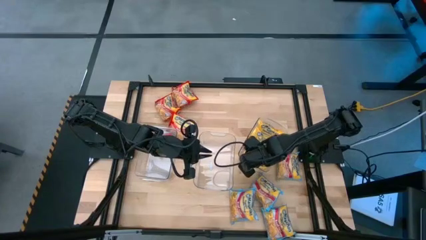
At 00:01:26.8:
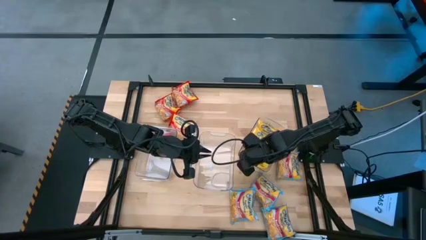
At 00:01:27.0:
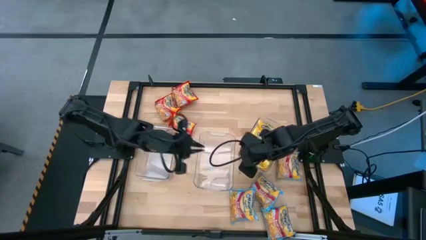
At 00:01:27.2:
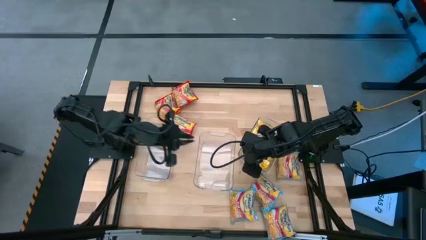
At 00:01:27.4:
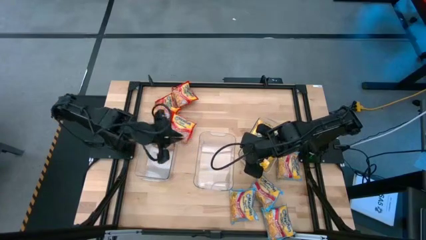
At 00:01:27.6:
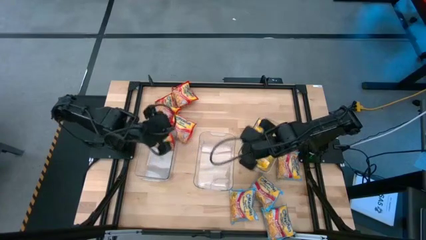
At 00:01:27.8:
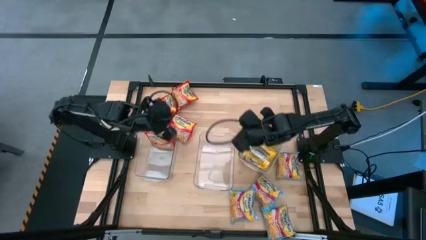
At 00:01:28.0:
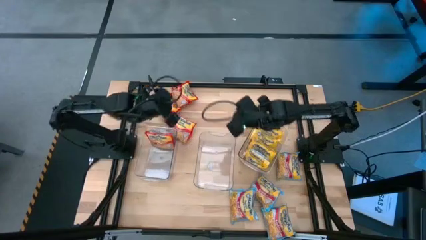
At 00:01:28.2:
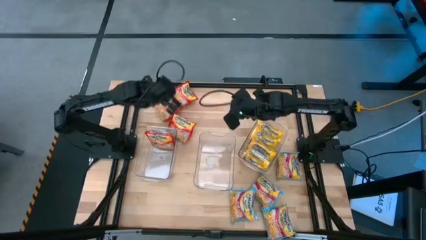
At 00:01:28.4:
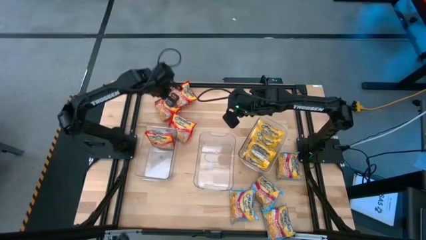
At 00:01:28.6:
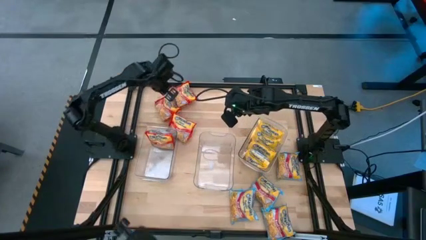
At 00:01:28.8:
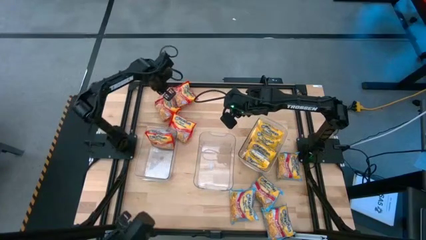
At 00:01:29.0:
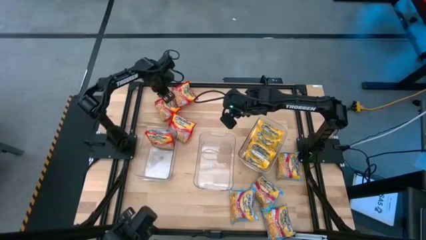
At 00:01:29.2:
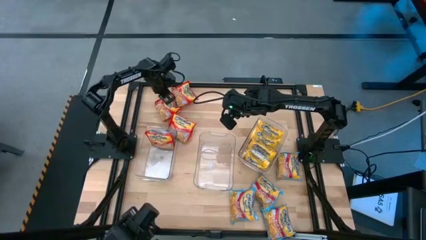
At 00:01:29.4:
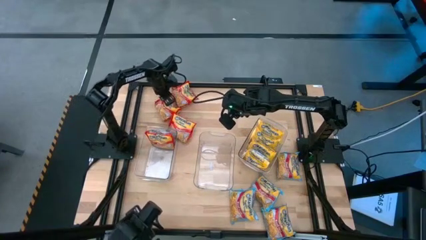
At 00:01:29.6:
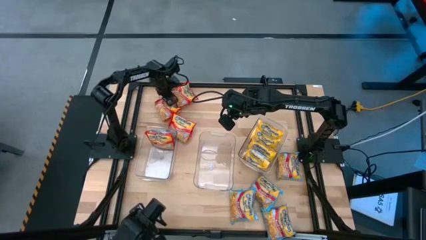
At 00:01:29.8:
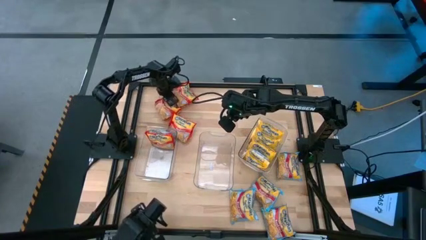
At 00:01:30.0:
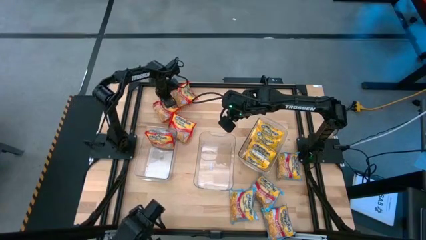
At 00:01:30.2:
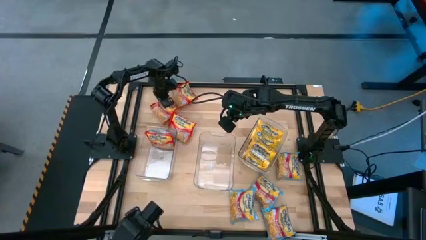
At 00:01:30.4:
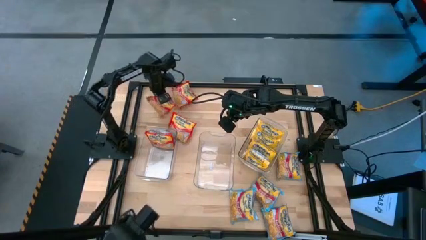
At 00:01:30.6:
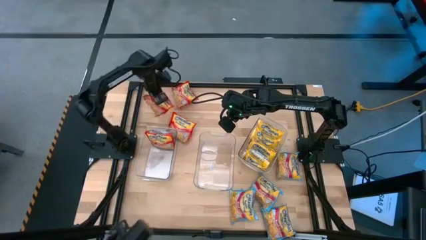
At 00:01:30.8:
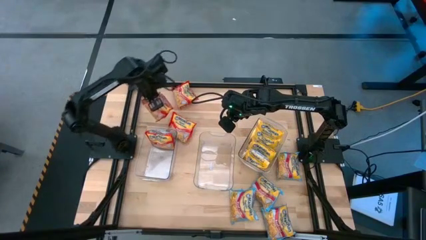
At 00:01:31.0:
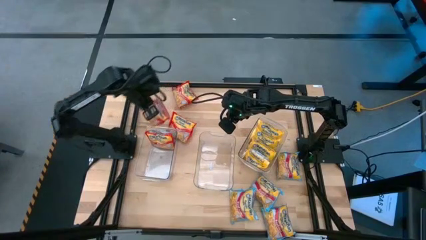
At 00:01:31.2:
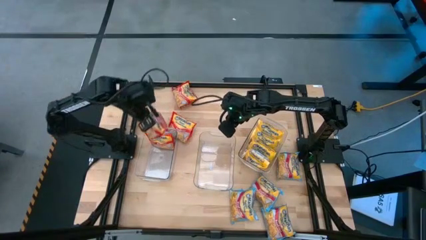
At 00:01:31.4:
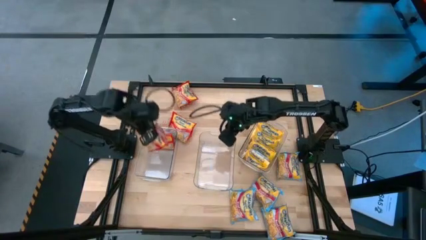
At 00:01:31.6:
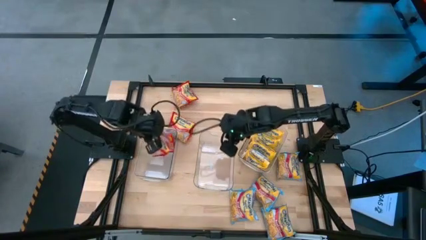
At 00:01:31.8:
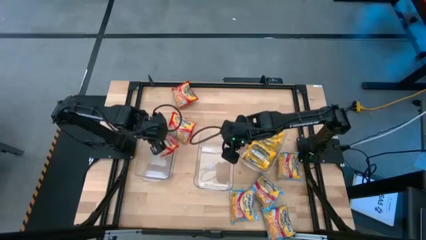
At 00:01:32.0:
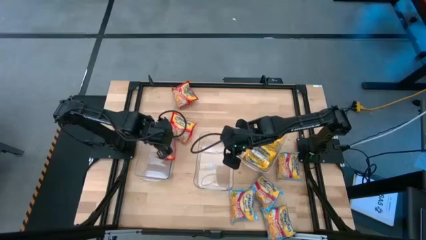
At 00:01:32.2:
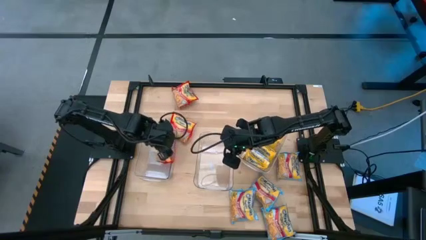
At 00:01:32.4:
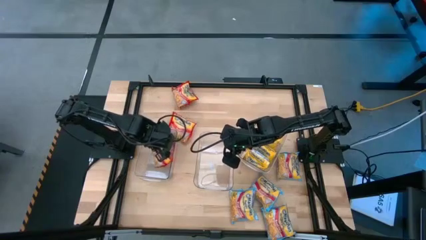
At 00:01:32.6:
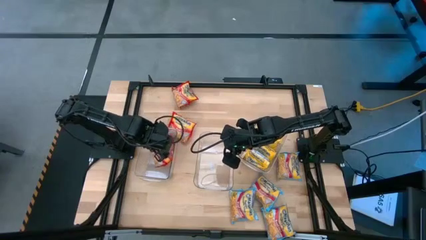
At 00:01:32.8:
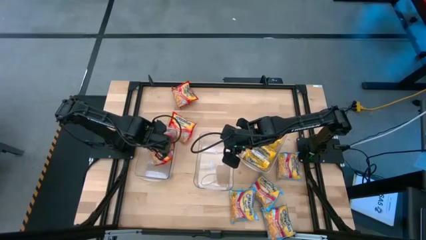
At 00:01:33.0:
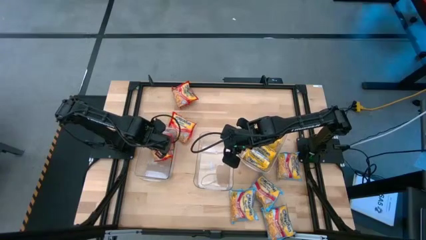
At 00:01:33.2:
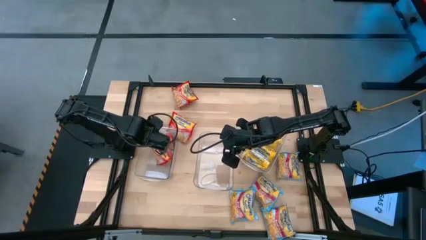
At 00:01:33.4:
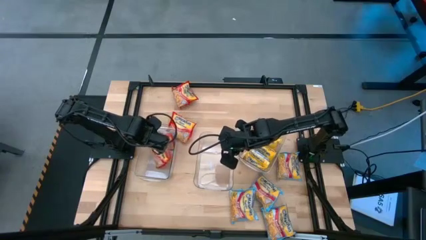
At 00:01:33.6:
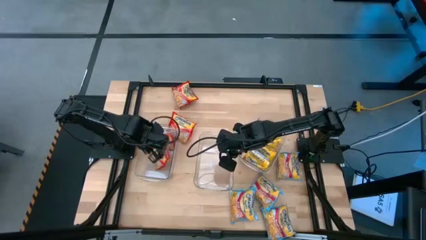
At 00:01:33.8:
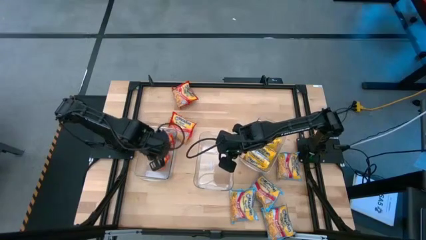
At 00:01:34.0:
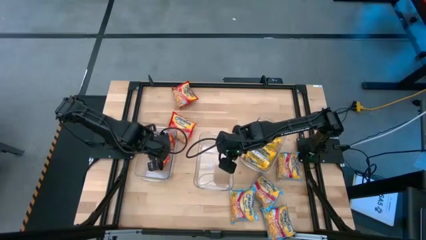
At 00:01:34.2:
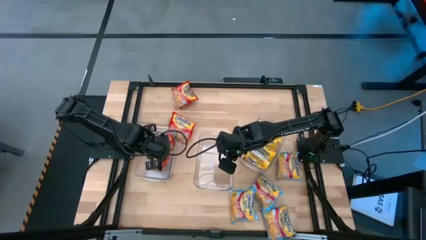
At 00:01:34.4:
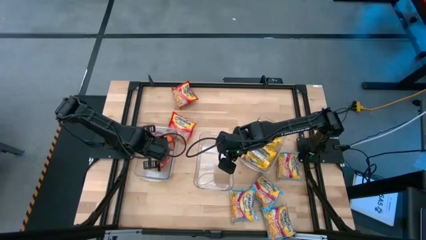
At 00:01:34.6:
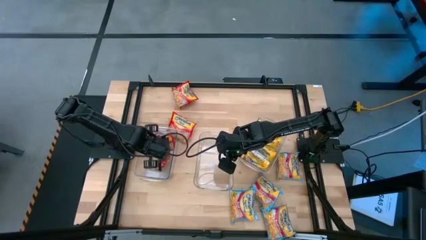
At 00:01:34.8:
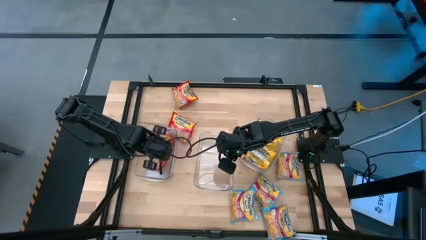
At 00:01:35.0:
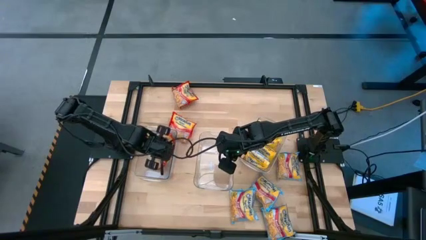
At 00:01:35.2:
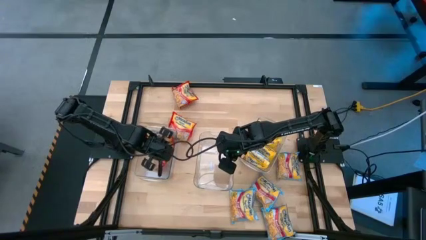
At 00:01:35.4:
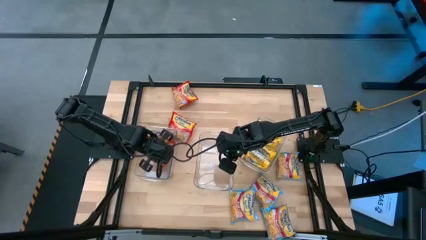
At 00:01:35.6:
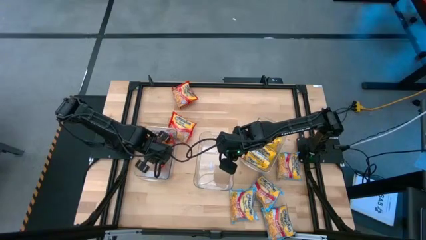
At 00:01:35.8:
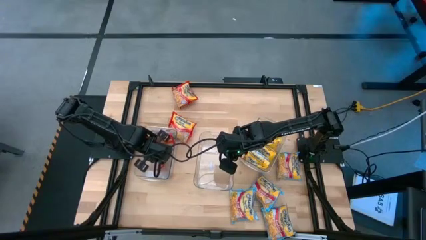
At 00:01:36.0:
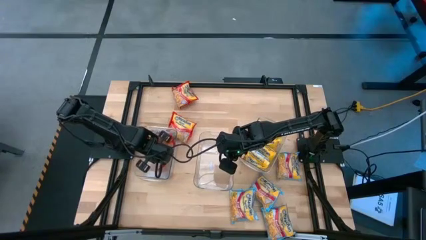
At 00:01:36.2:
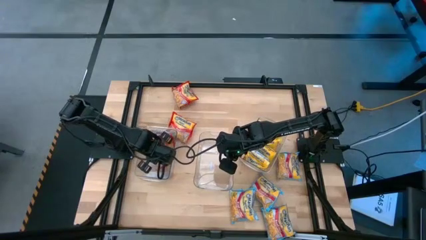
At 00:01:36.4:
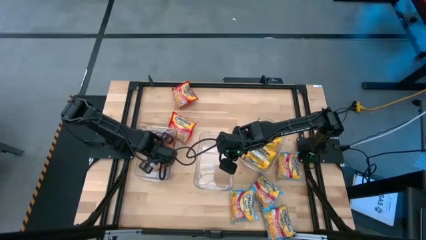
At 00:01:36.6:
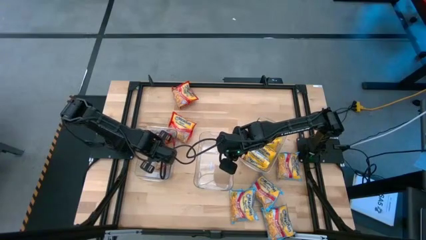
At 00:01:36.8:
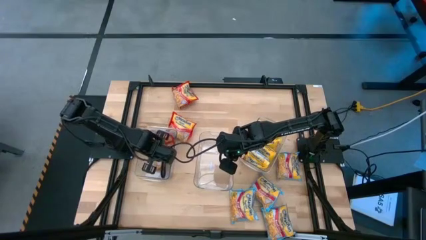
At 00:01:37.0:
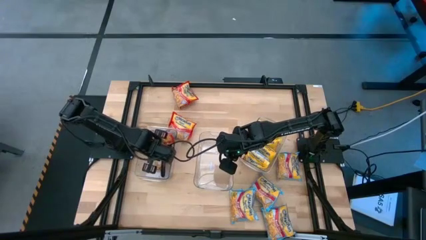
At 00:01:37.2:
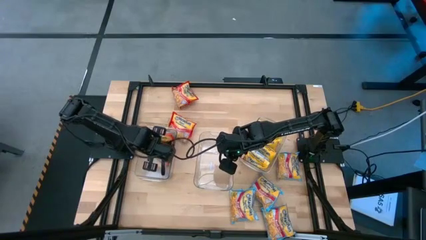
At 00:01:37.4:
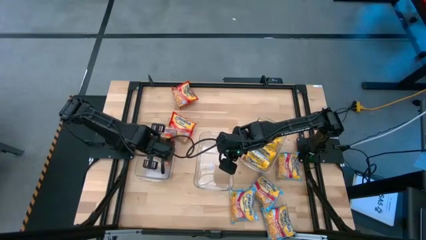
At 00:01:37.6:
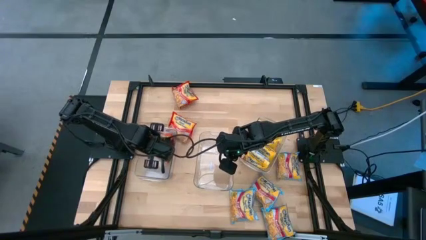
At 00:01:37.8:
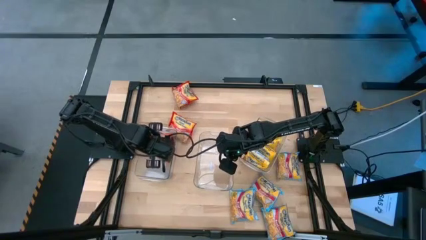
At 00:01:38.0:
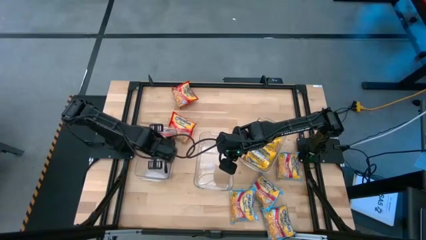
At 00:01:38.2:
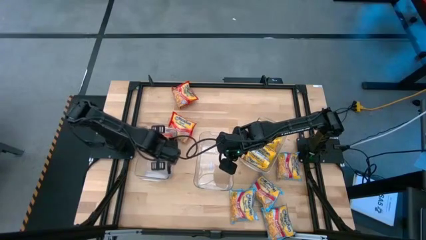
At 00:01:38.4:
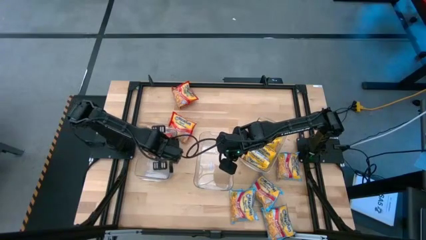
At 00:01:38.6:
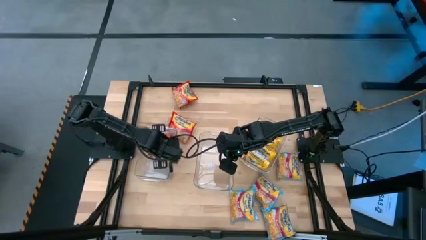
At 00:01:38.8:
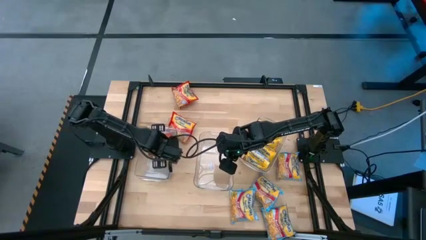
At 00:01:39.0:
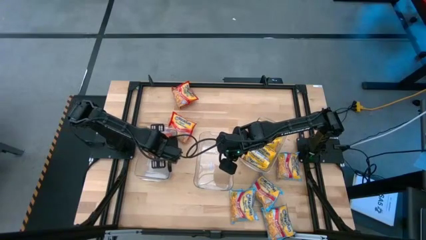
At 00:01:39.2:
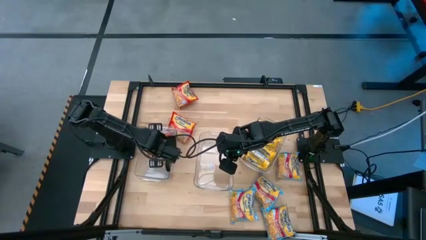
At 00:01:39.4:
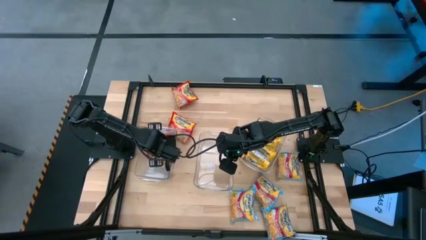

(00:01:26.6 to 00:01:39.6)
Task: Sort Maruchan noodles
Put the red noodle pack into the left transparent bin

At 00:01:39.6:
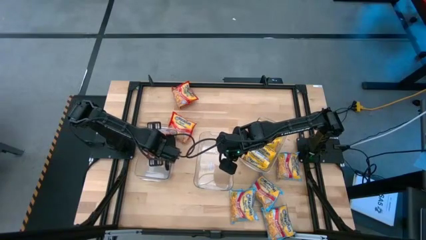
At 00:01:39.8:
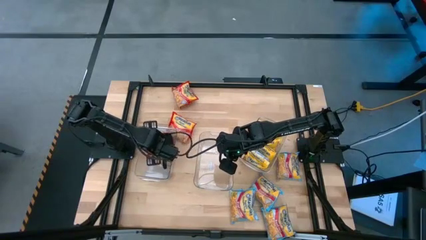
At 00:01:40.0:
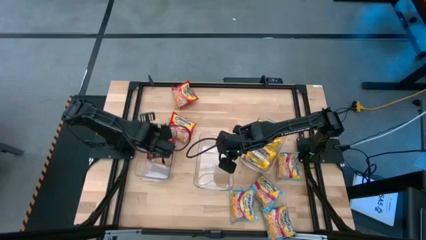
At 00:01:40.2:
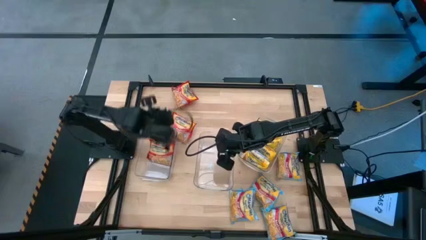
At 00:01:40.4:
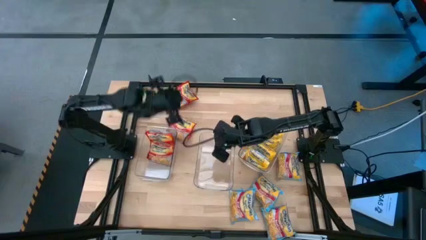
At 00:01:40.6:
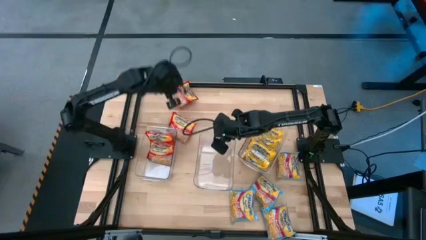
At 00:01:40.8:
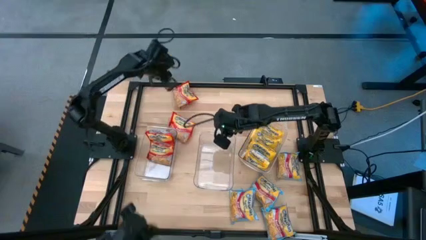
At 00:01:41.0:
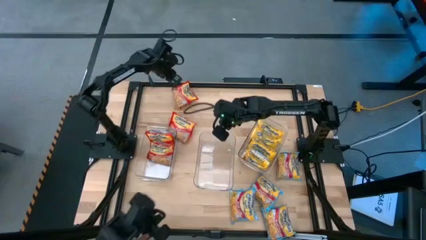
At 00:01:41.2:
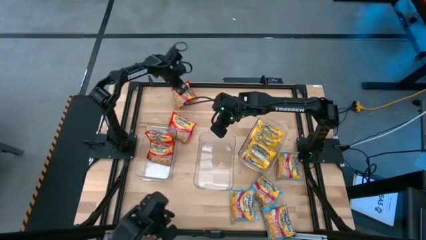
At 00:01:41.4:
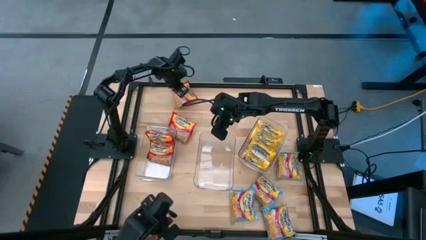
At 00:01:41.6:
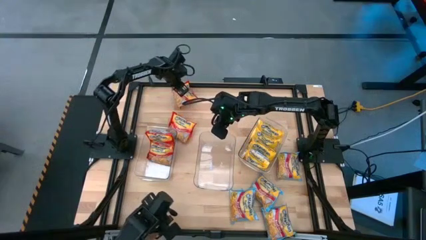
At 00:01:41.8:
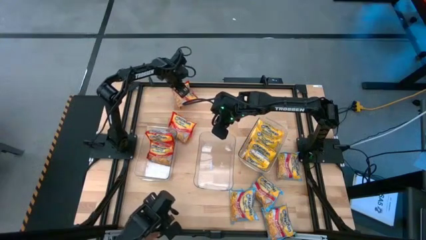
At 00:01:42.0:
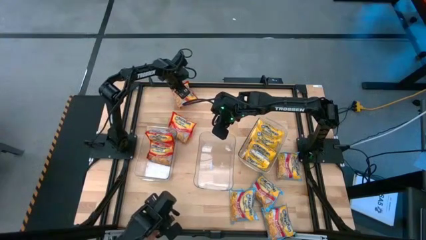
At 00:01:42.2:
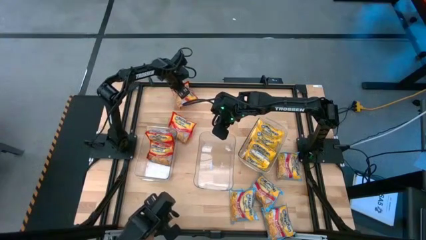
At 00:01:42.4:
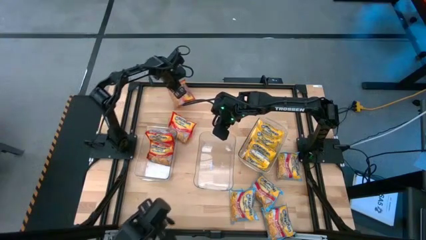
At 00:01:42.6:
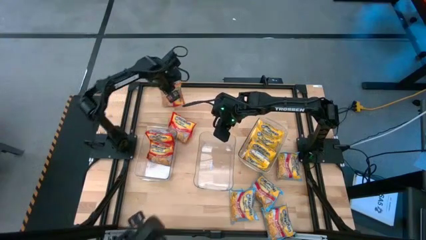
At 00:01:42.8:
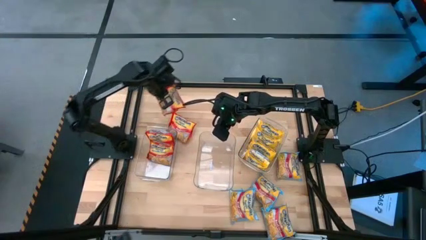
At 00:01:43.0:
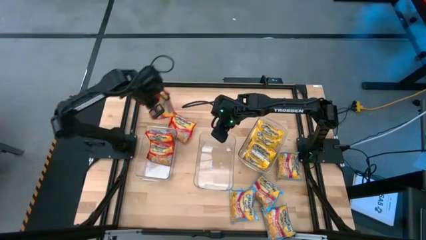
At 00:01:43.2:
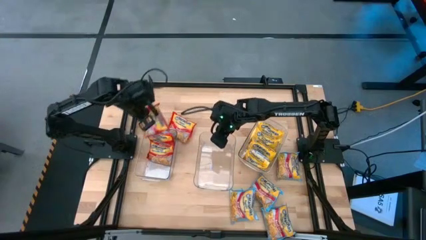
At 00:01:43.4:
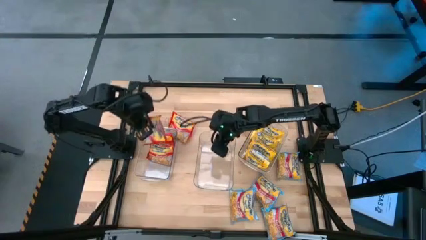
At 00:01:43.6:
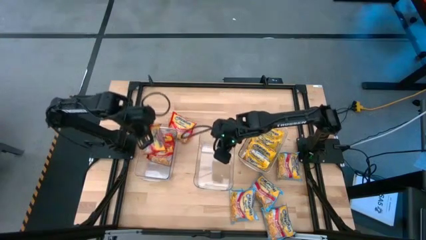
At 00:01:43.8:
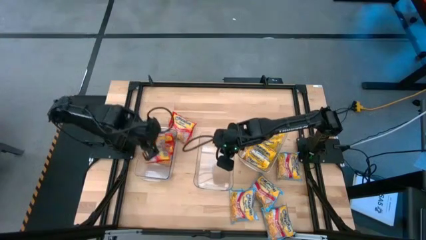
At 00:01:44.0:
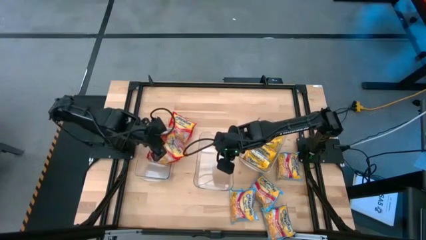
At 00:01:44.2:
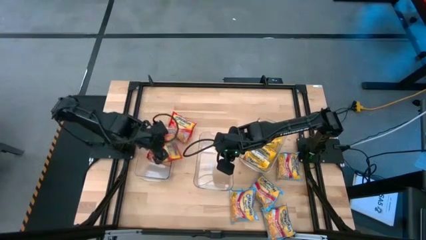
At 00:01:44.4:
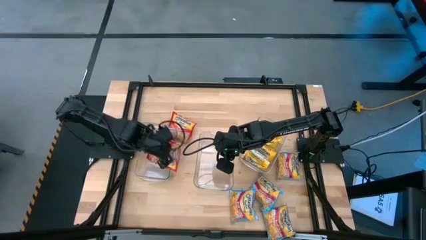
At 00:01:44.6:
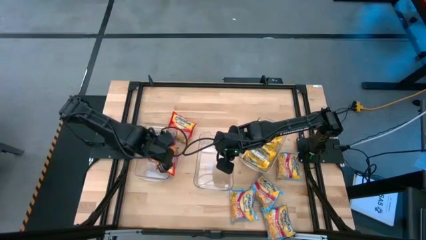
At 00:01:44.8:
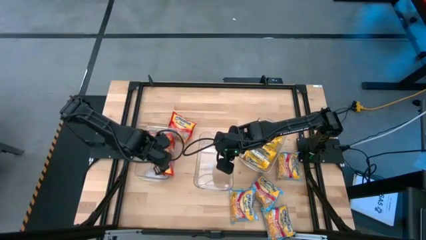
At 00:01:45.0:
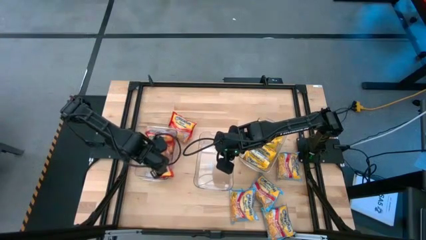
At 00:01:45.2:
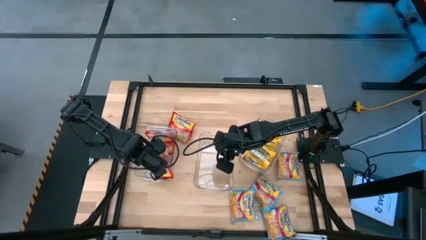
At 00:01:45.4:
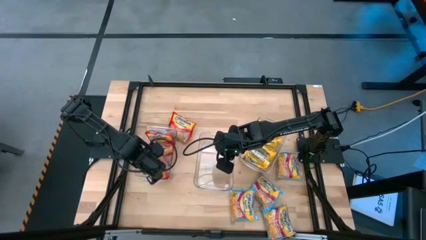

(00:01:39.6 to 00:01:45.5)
Put the red noodle pack into the left transparent bin
